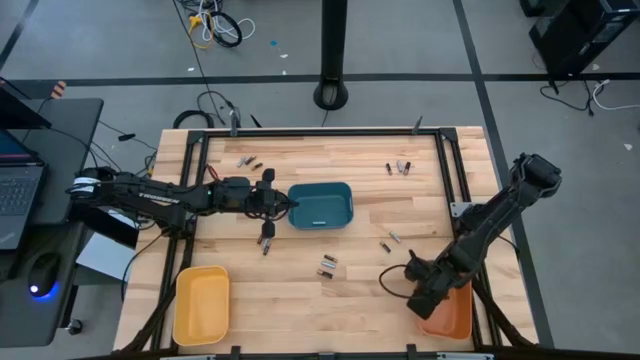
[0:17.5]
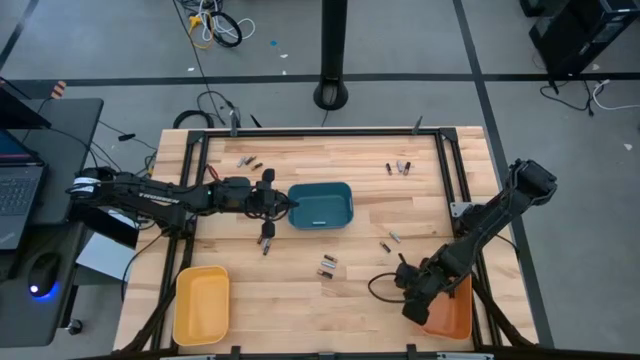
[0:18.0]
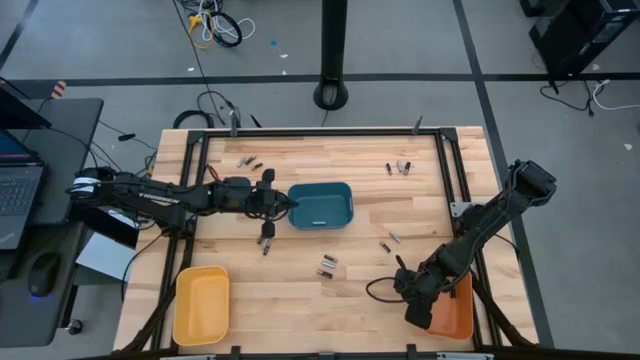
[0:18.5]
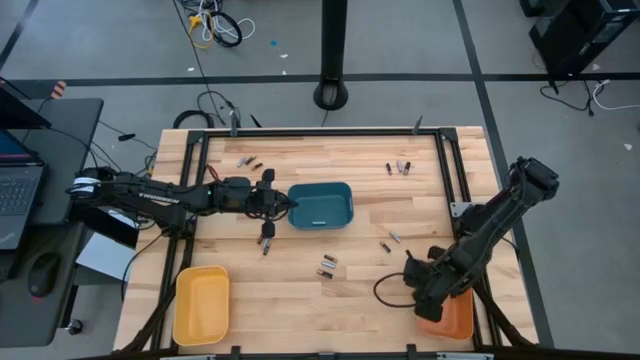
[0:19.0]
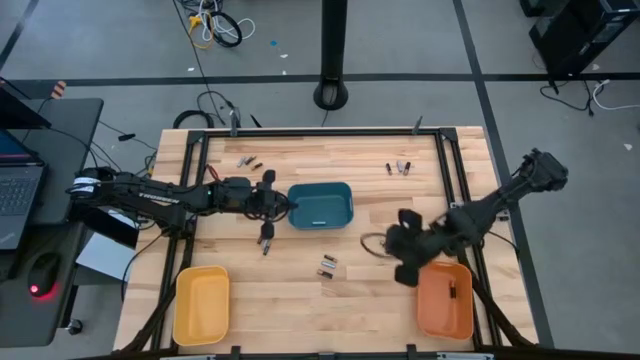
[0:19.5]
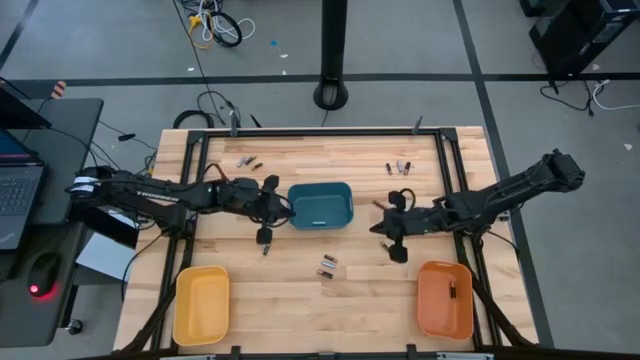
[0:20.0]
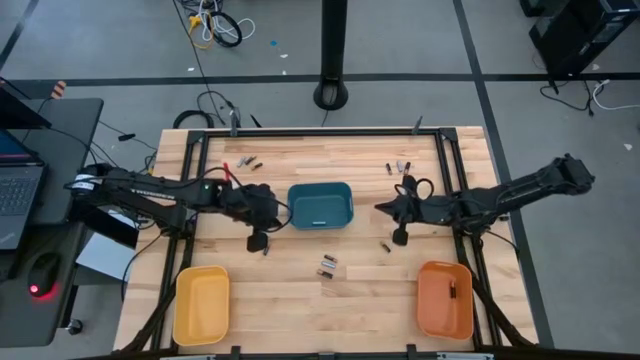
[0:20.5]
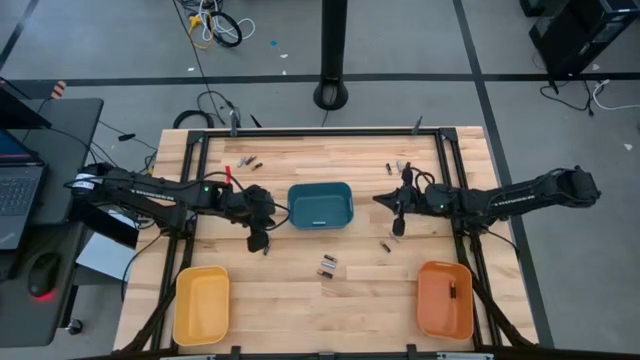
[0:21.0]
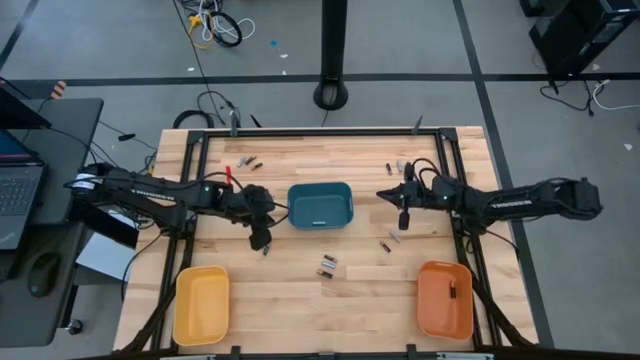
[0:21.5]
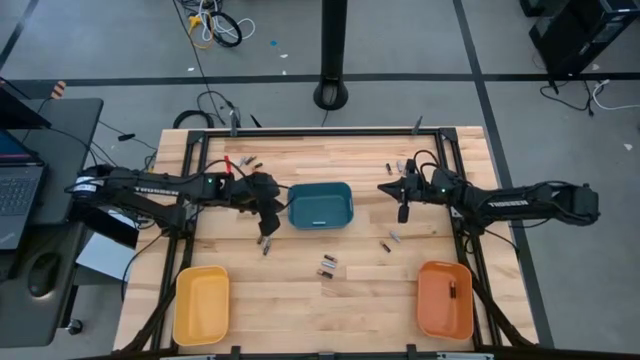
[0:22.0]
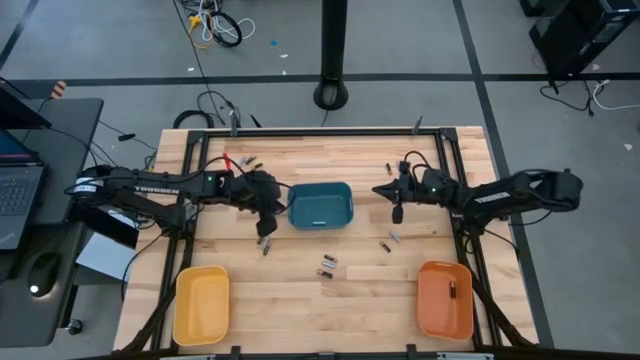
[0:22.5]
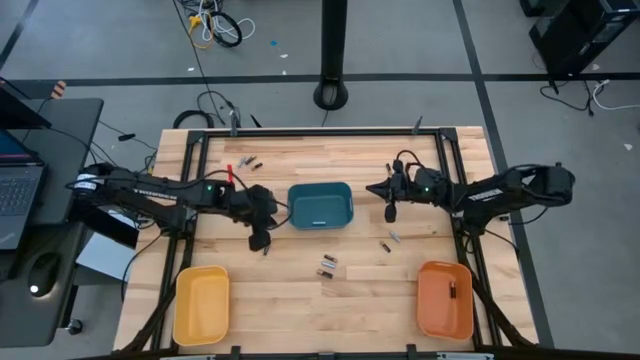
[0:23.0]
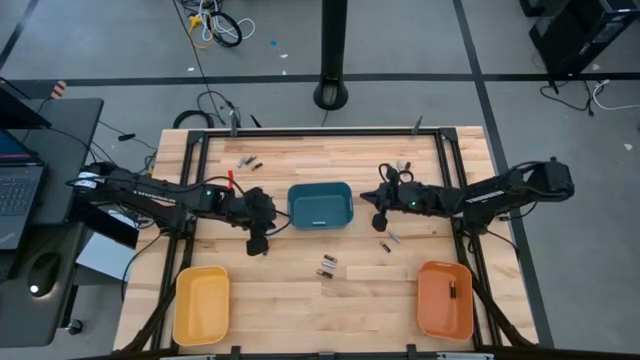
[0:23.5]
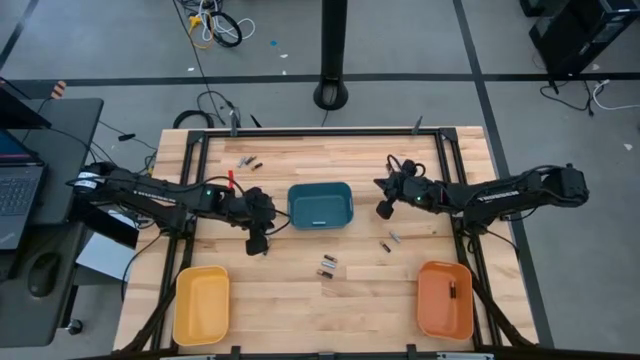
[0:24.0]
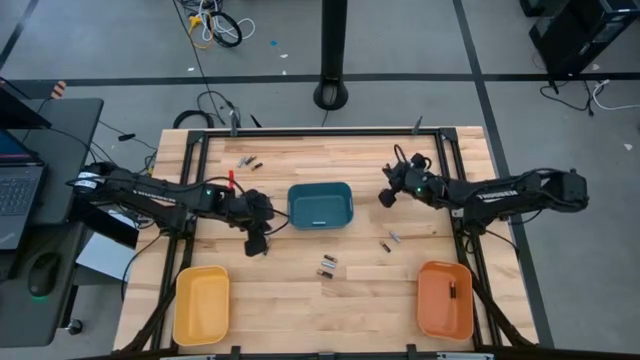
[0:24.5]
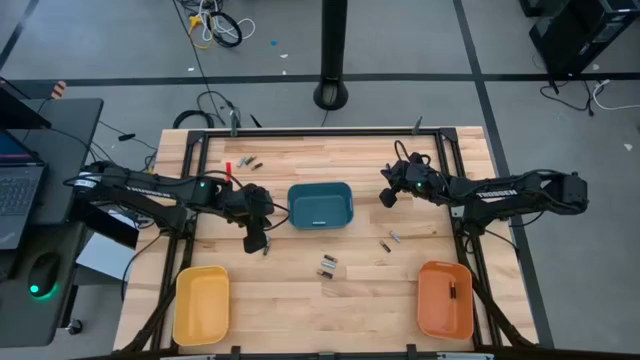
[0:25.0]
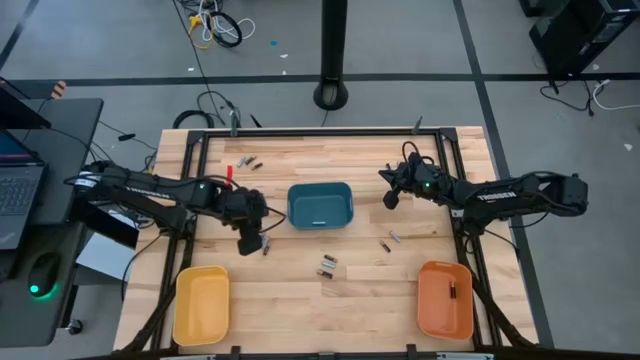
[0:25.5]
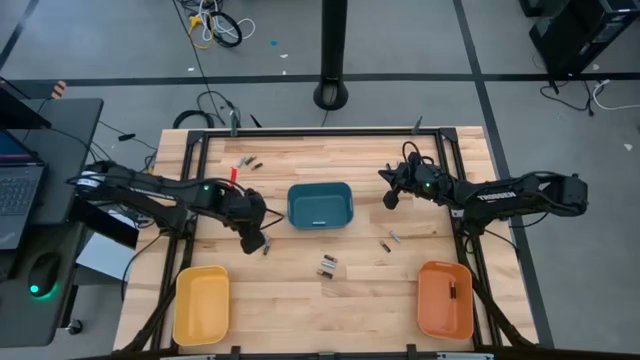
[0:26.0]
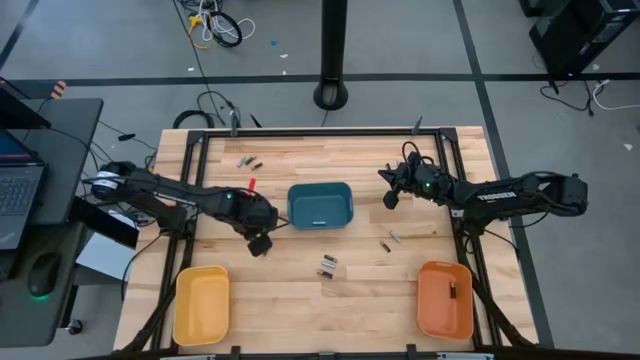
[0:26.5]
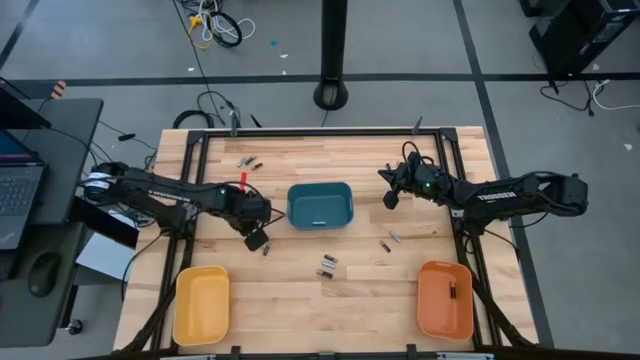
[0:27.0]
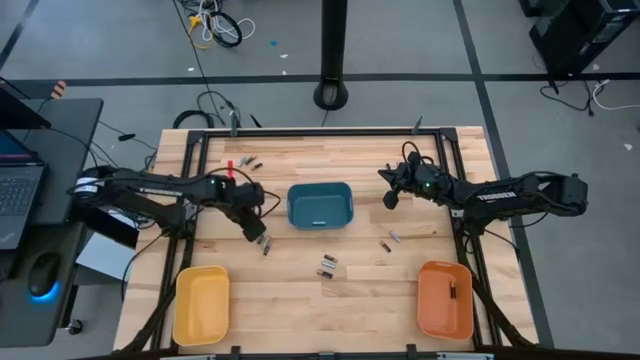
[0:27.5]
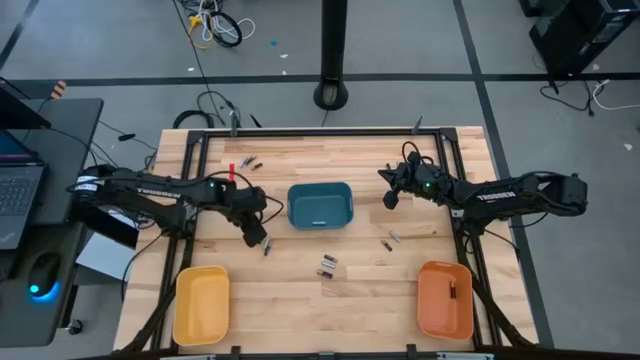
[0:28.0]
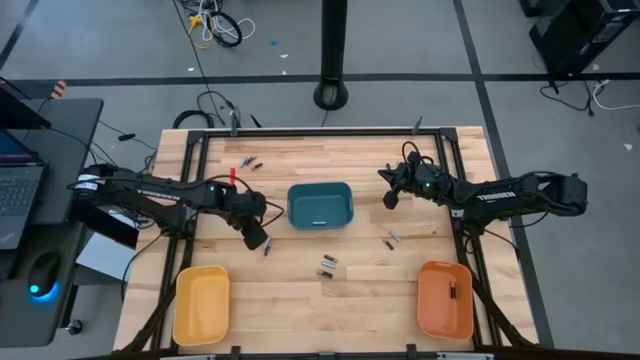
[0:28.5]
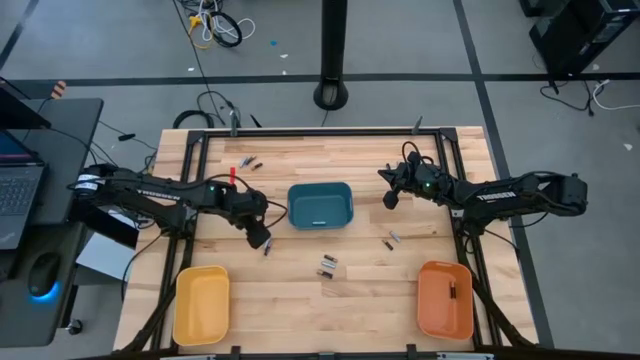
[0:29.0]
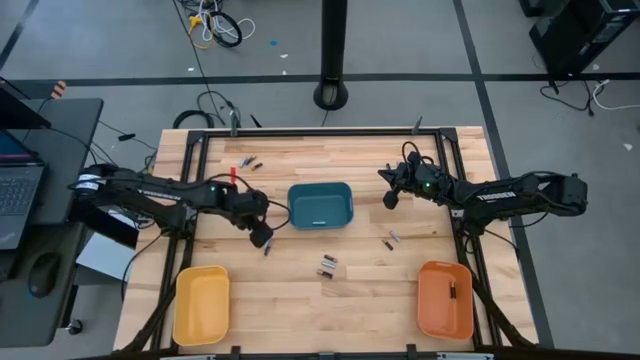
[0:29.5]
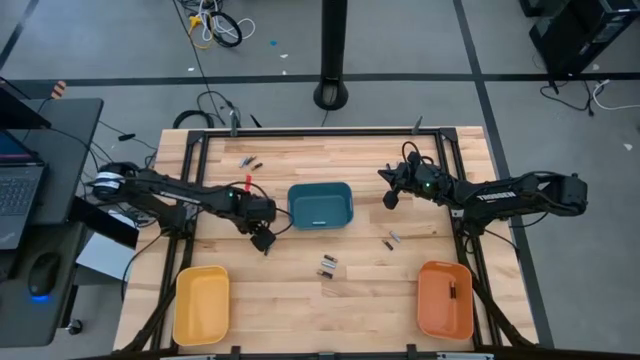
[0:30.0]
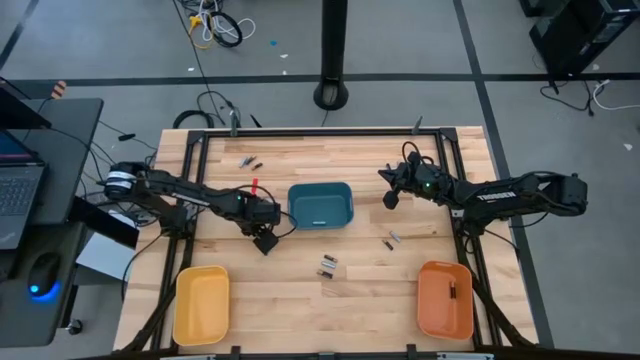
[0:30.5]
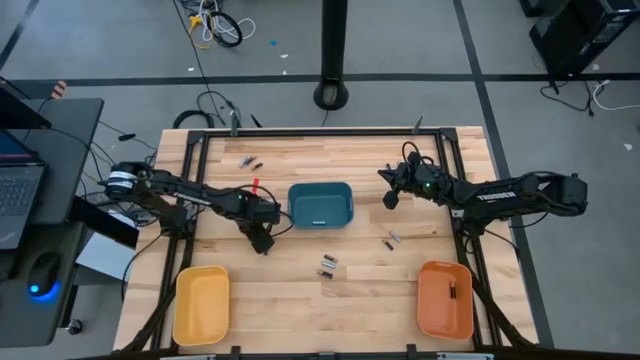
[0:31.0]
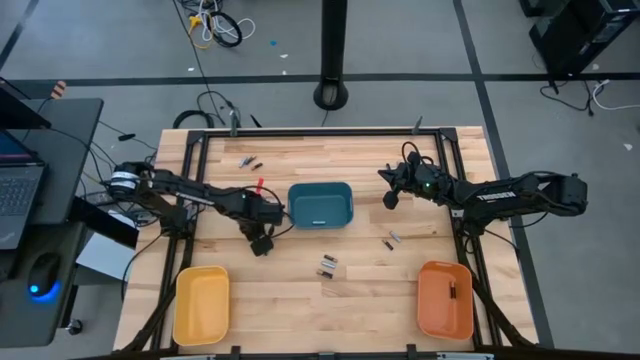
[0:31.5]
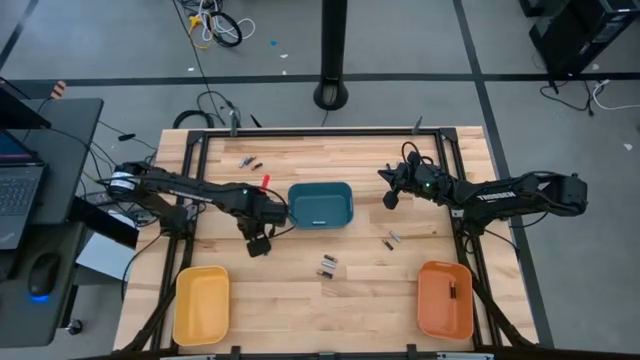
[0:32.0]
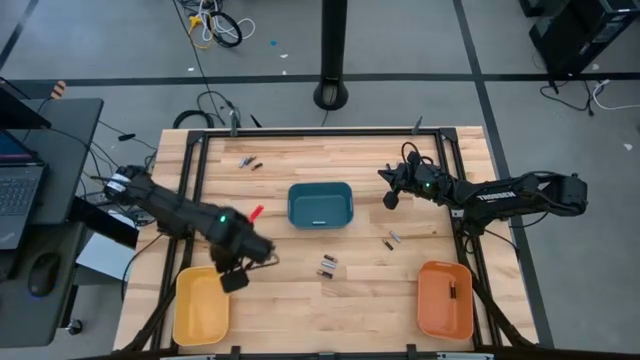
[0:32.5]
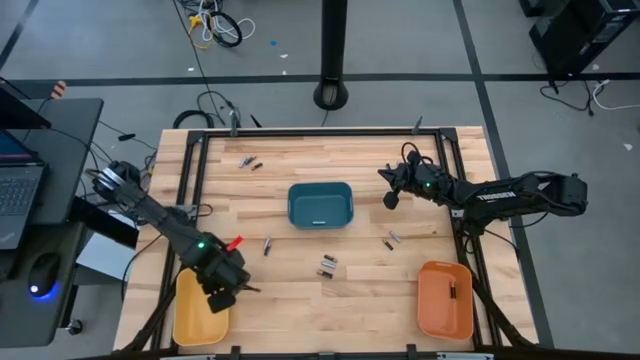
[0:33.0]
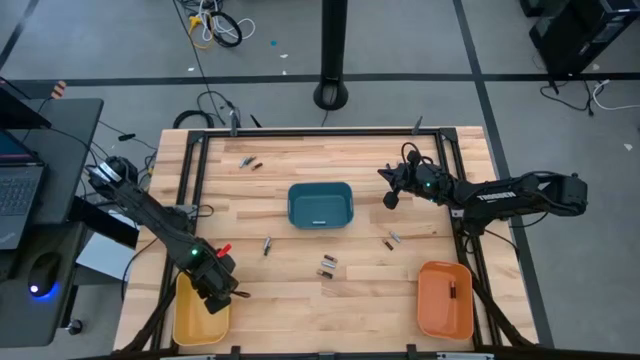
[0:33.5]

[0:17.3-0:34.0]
Task: Sort batteries
Put the black battery into the yellow bin

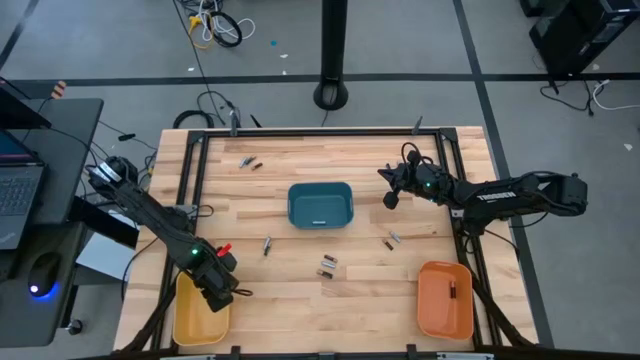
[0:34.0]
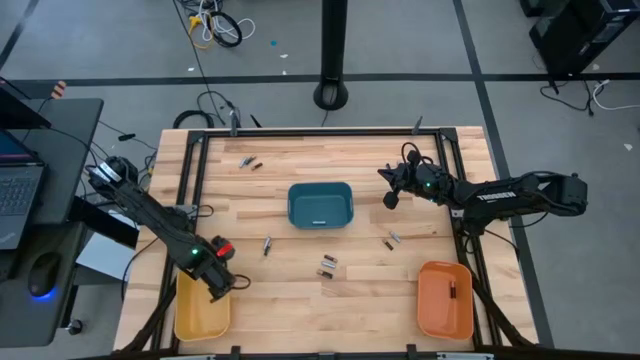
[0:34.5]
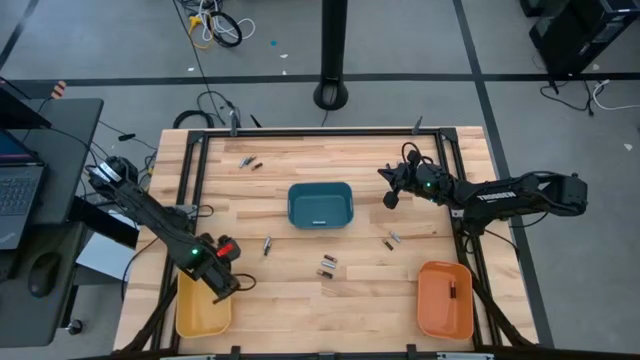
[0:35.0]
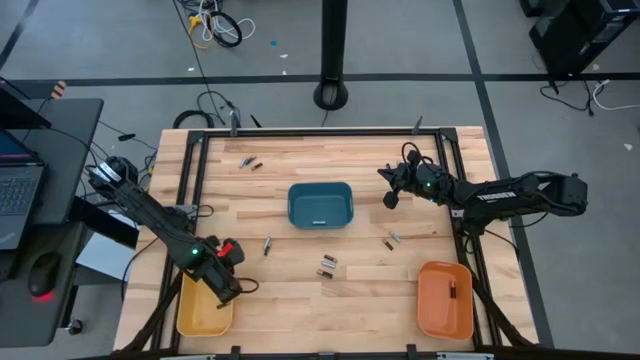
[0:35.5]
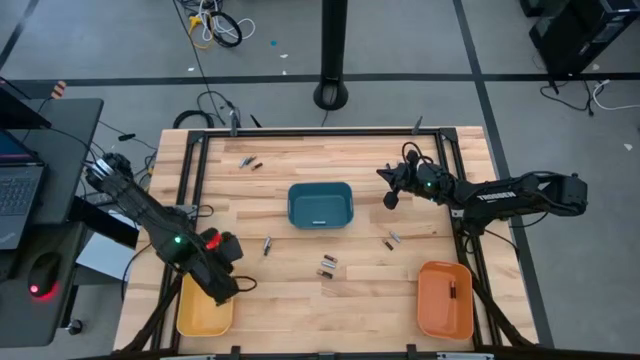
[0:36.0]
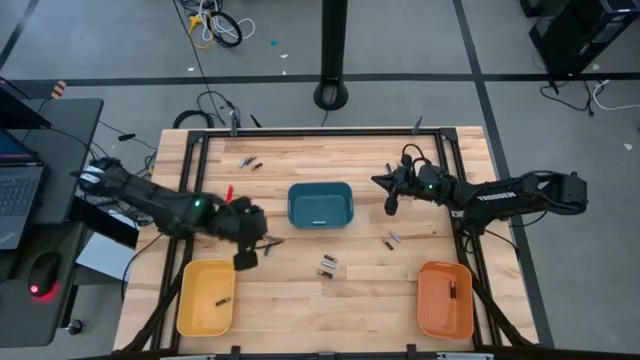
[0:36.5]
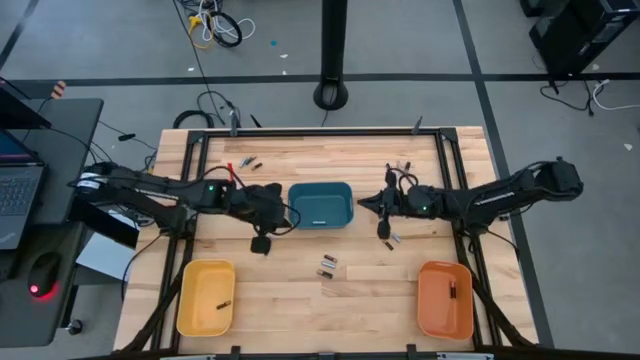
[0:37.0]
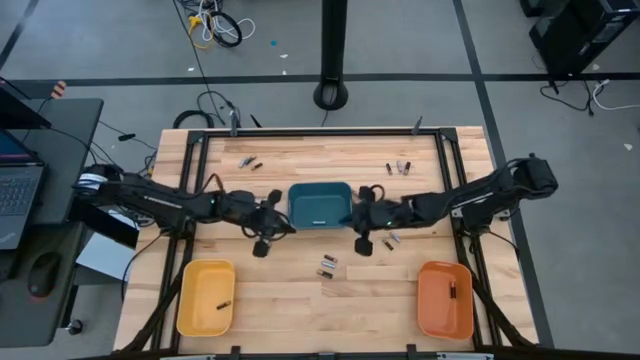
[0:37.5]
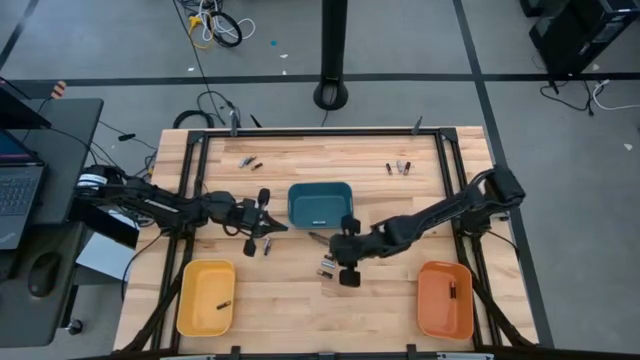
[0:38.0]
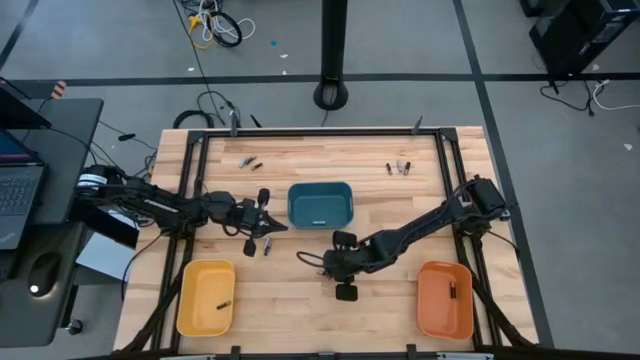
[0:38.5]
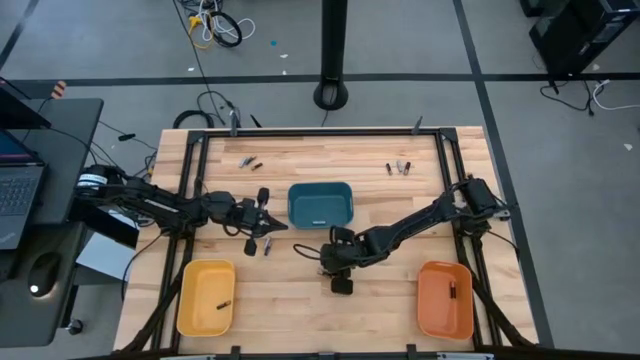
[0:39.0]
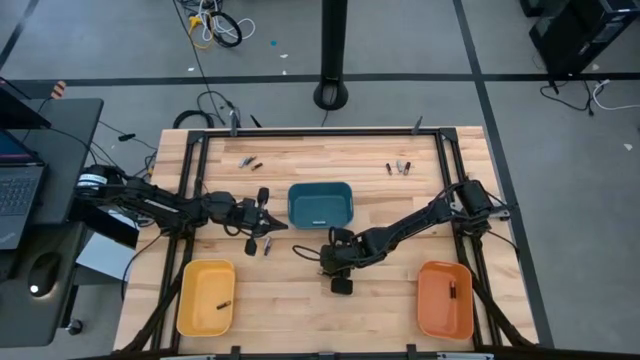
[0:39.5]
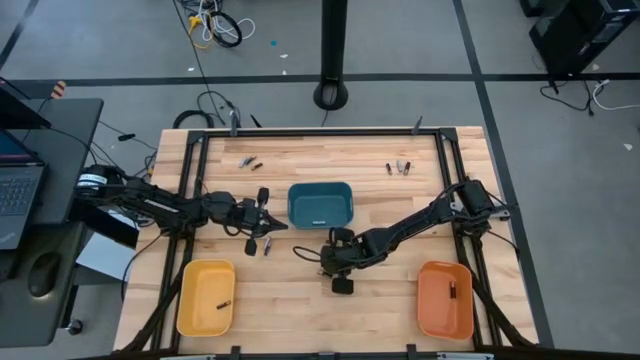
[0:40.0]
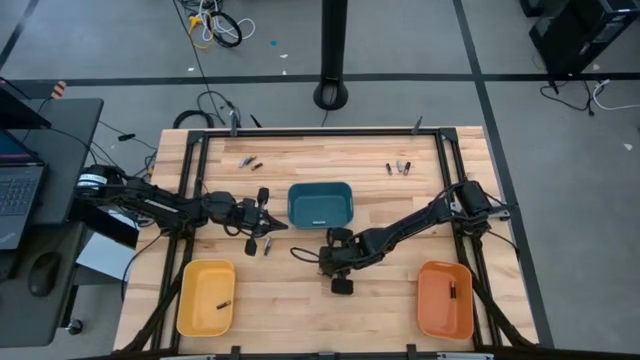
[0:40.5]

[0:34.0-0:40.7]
Put the silver battery into the blue bin
